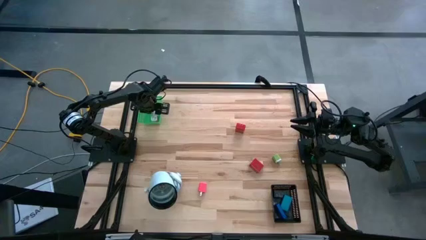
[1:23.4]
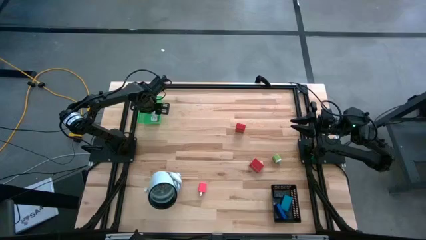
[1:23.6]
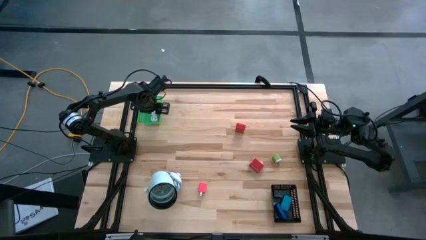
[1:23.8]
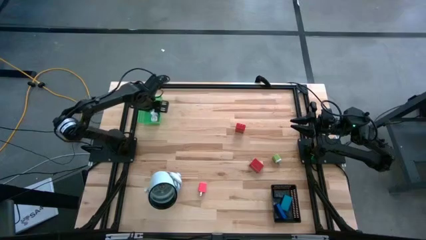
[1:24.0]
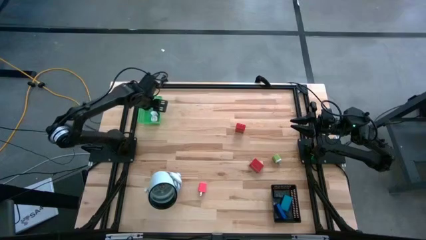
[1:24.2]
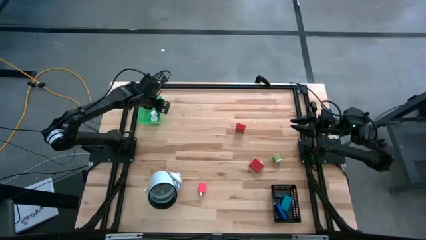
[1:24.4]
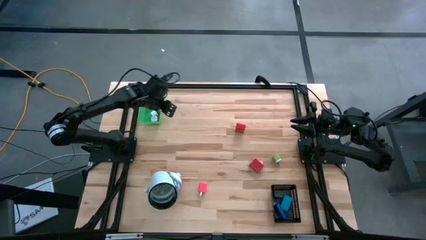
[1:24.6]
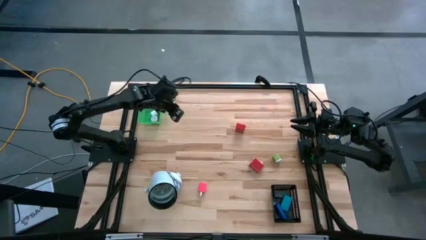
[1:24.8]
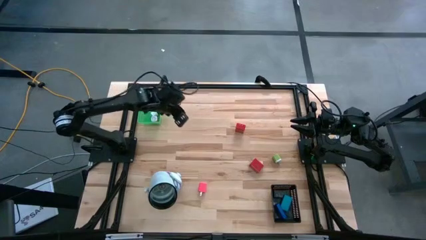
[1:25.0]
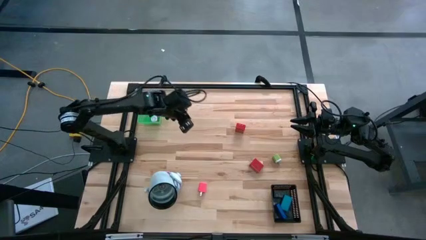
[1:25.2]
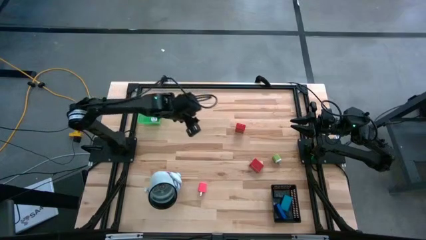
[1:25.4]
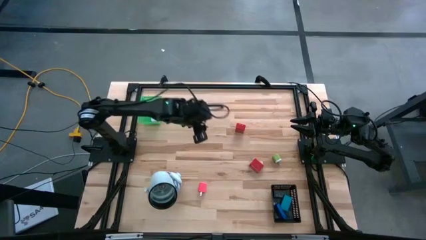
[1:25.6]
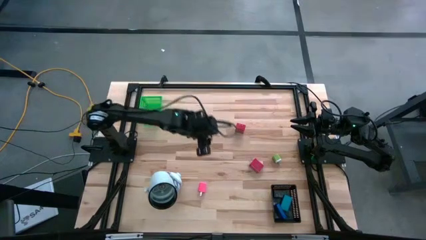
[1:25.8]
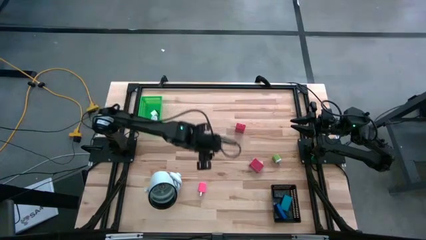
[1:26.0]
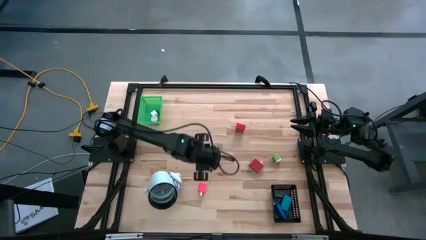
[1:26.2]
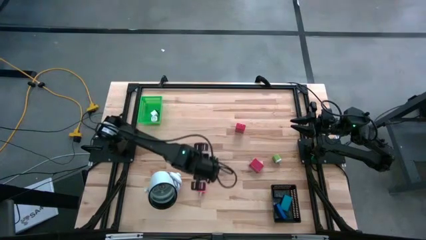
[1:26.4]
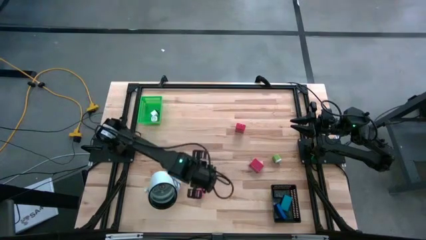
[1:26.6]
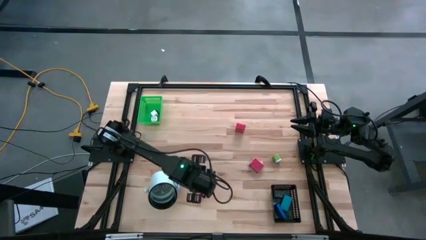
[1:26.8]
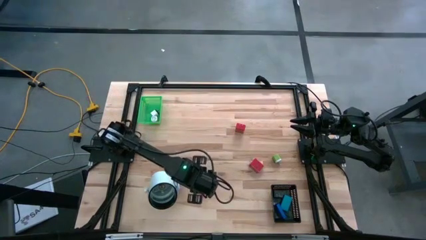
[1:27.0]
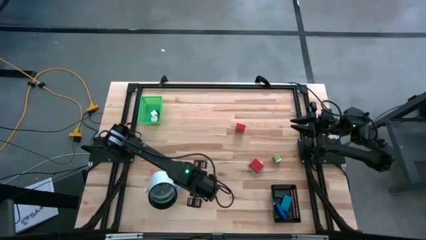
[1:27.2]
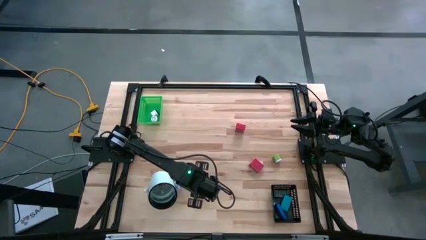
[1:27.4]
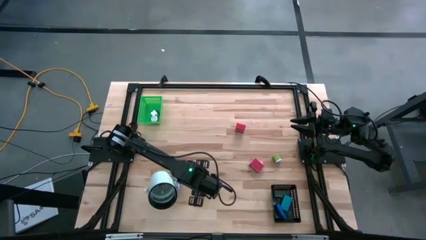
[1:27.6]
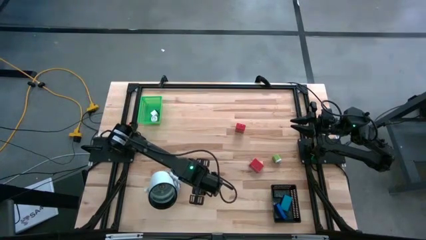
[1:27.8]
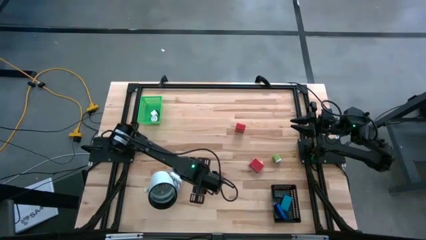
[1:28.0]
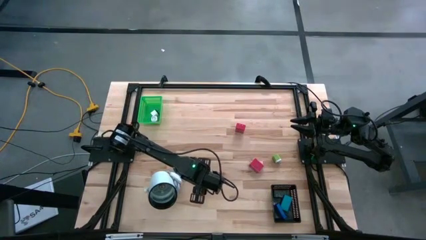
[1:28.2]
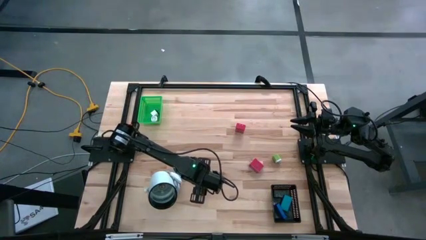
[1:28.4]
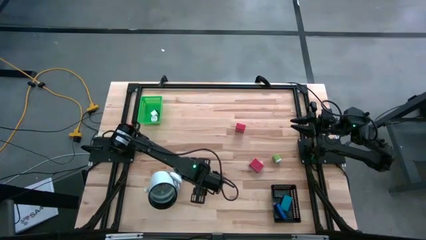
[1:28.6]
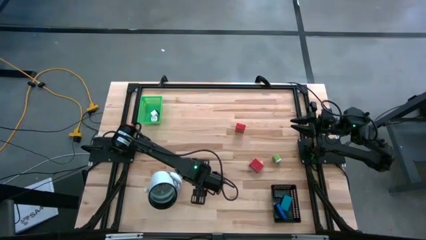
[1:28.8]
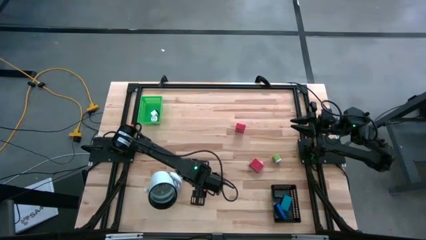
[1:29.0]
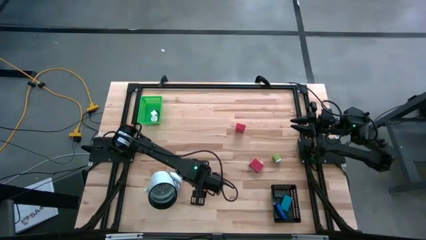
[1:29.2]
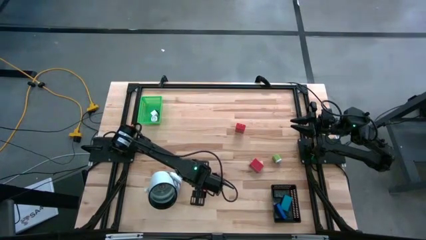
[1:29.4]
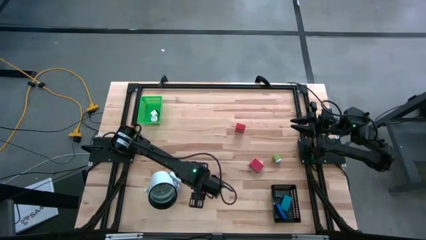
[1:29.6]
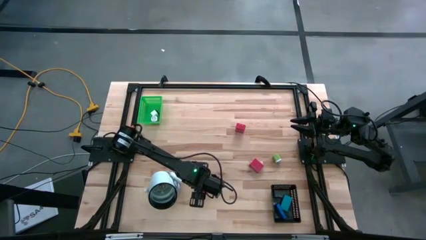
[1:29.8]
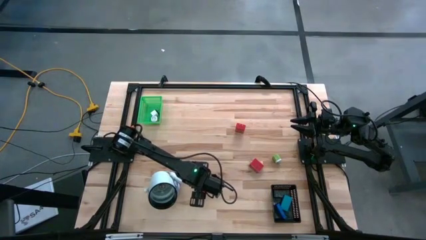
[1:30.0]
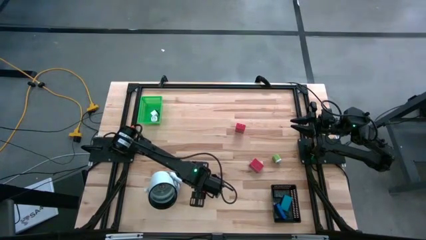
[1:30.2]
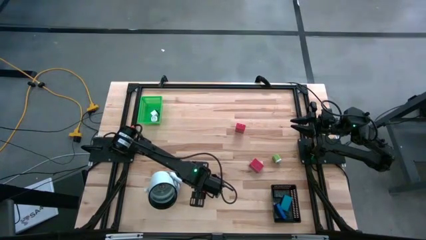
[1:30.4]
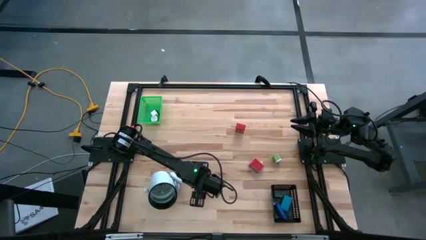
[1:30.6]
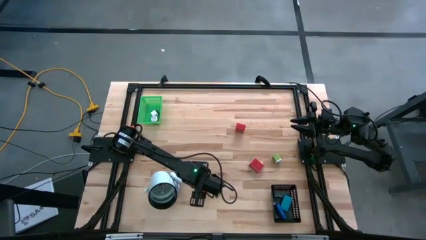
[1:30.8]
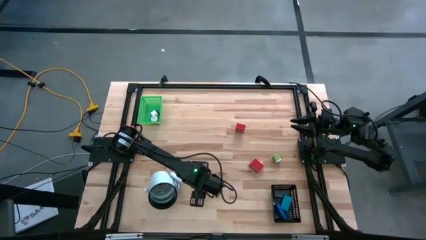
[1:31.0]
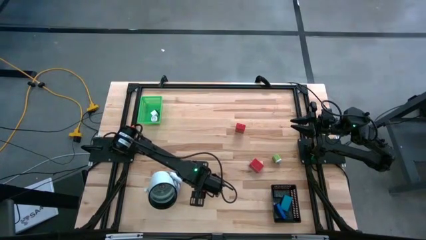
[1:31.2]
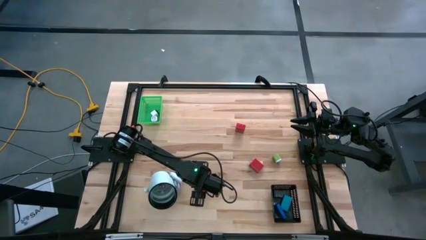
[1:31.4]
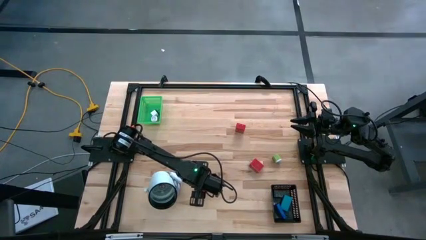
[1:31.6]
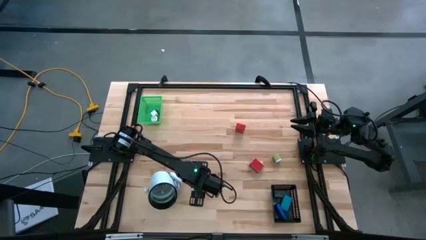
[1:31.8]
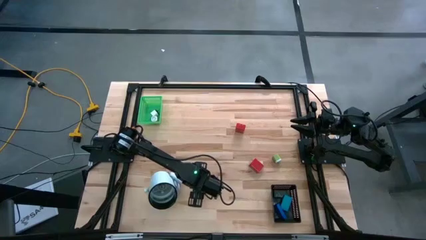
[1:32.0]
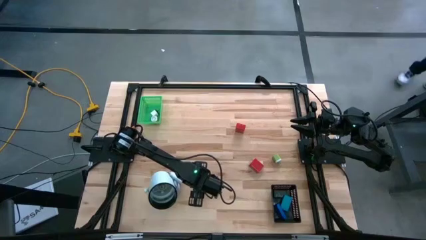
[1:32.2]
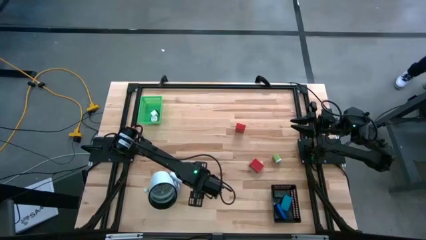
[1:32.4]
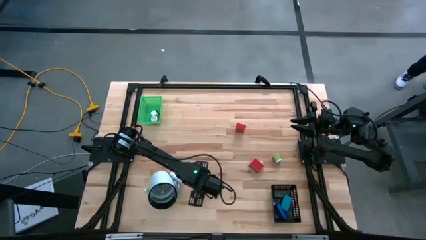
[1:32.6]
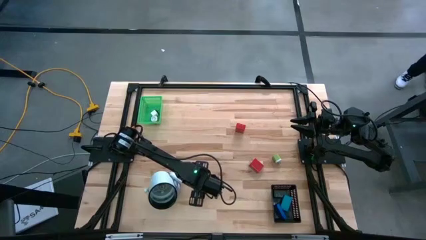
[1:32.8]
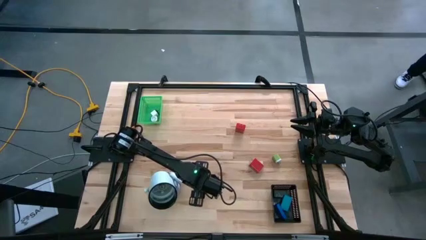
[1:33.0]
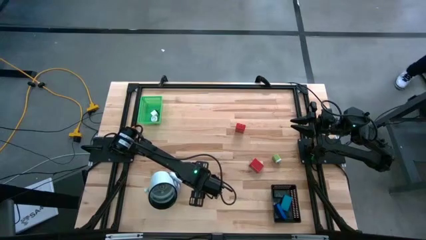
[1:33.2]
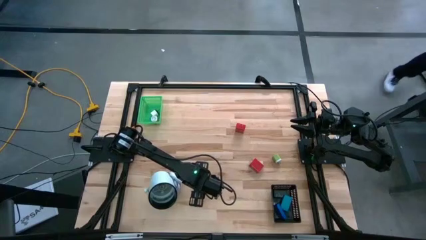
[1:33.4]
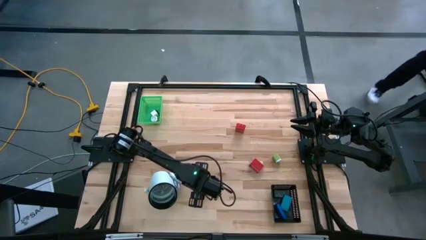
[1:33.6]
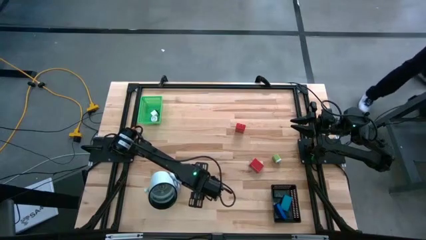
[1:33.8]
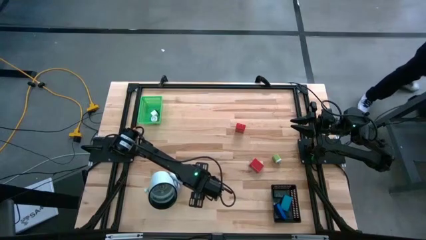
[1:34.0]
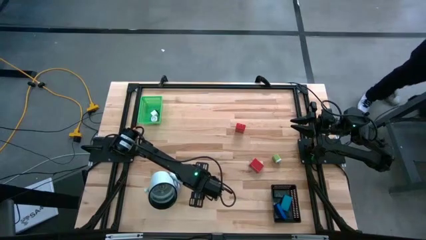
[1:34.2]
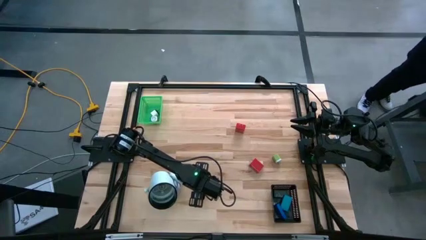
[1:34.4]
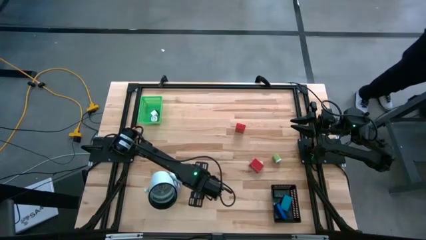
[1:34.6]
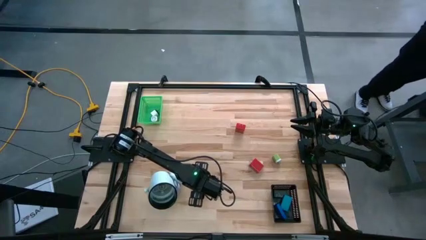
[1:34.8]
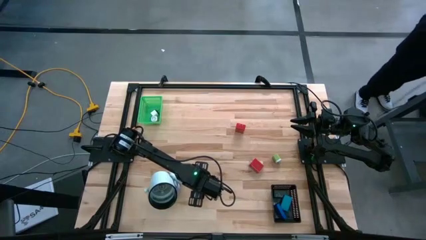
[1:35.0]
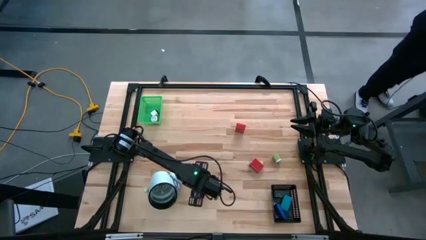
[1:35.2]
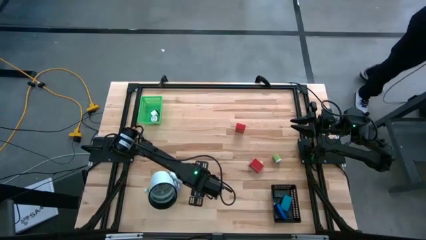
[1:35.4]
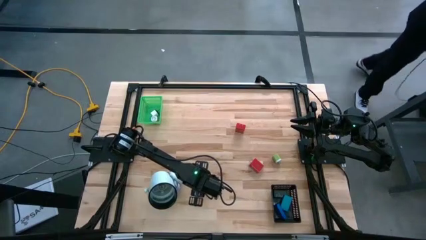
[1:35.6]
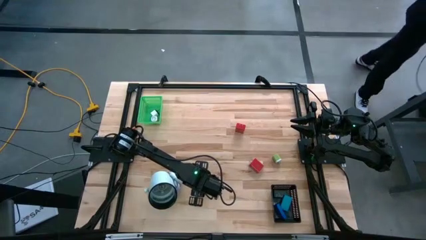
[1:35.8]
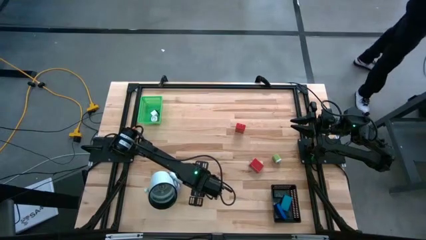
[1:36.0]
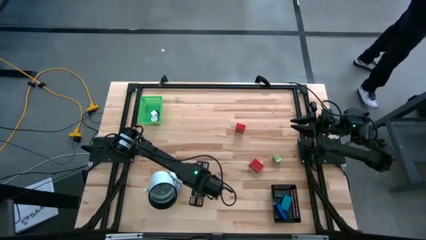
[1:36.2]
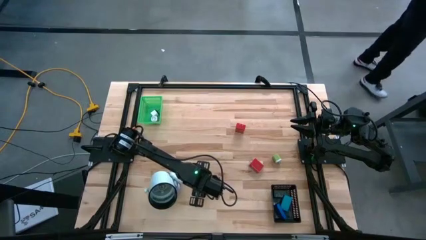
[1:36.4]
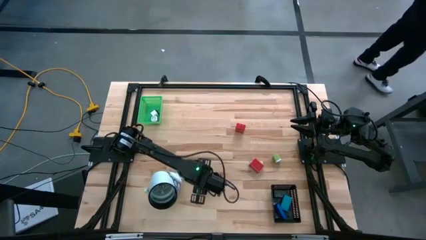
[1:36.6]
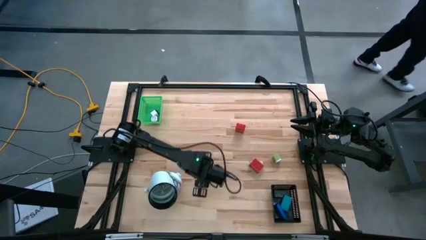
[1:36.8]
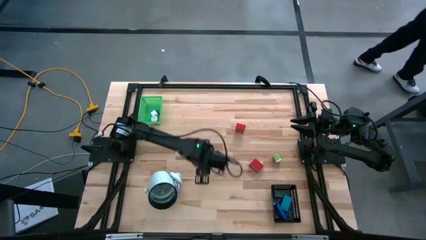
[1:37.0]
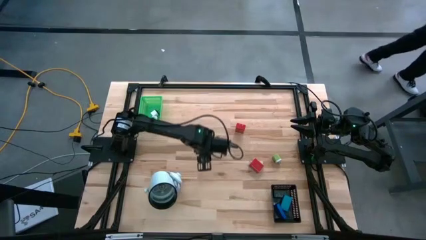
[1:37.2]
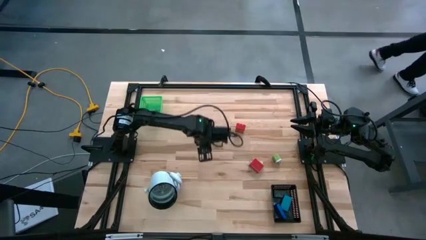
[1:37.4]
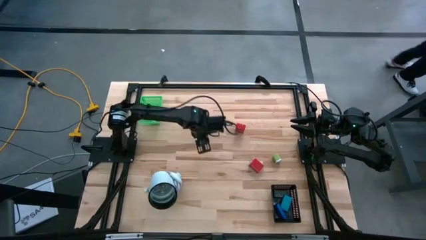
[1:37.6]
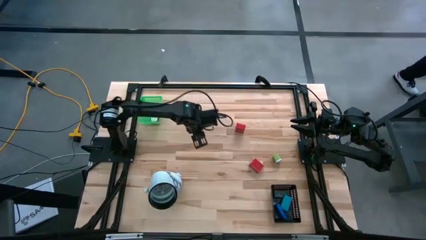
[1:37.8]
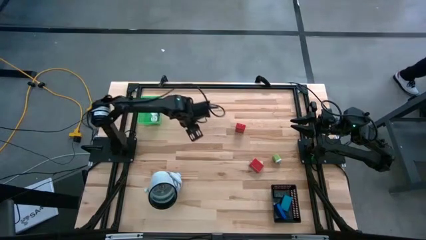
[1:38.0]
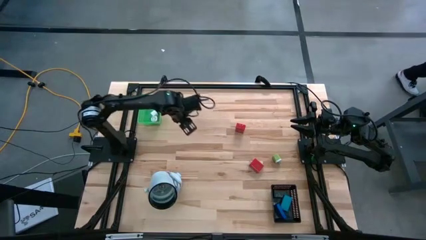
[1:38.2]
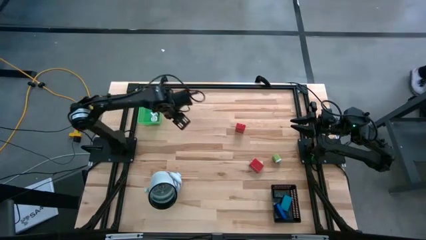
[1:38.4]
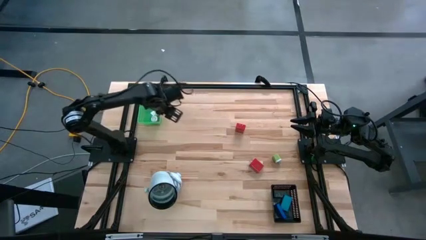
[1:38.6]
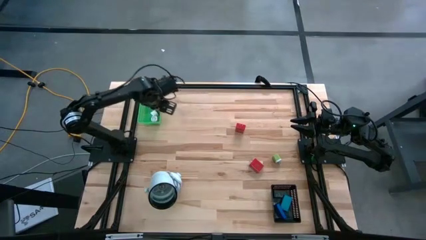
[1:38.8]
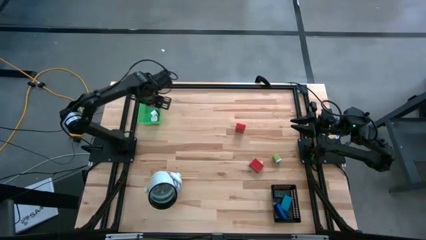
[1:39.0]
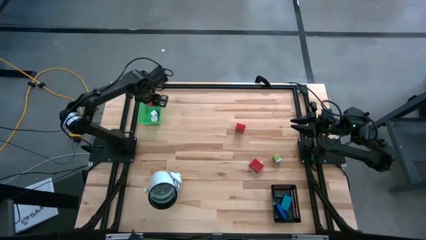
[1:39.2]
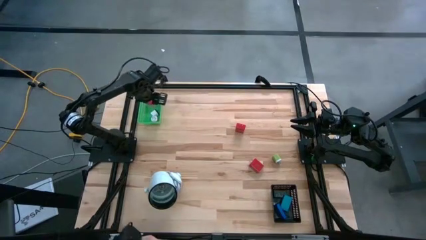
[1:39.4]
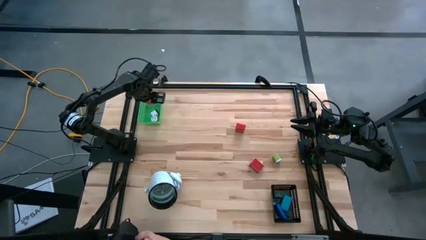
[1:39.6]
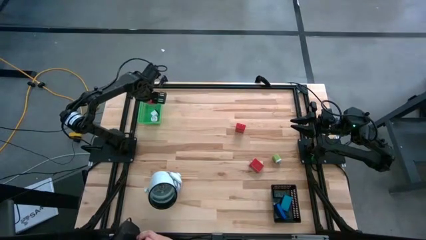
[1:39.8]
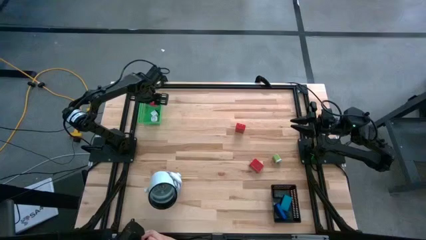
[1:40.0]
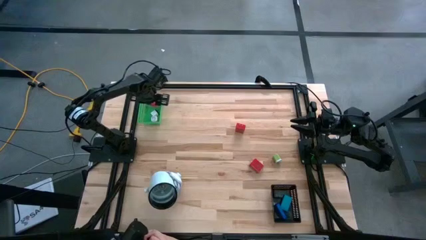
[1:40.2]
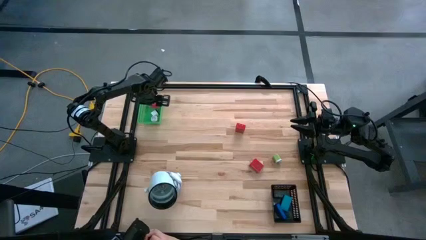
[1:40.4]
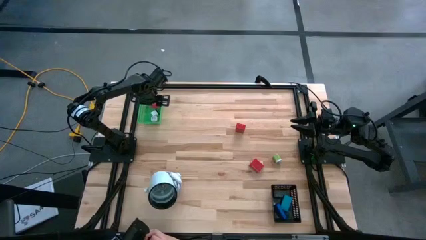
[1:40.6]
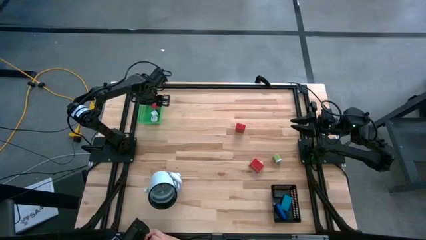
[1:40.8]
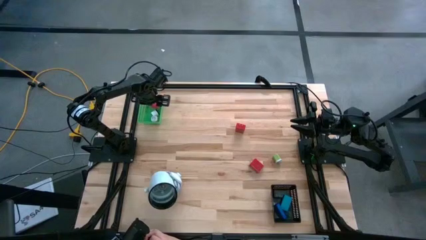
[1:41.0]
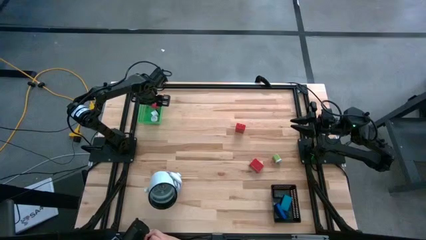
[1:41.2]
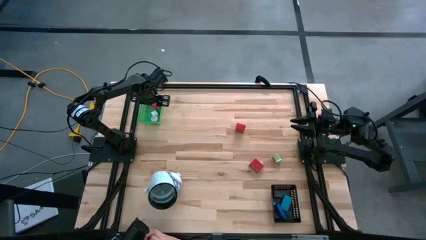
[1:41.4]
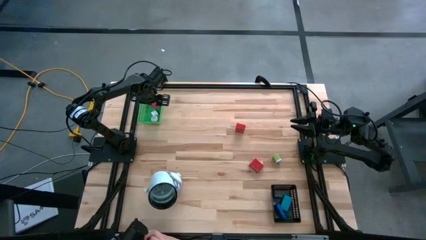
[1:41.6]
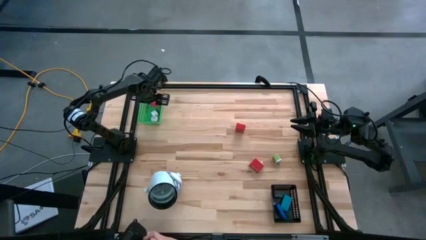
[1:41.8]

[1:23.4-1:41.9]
Task: Pick & Place Office items
Put the pink charger adapter into the green bin
